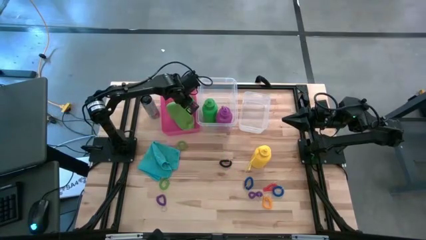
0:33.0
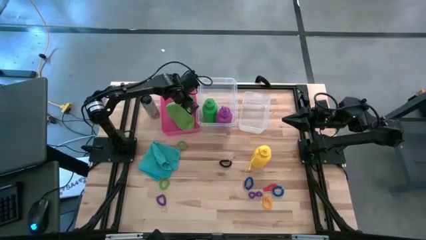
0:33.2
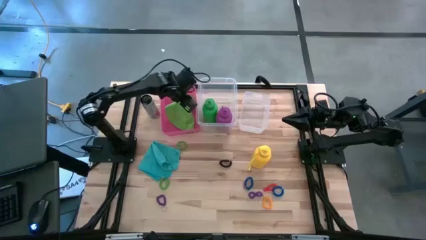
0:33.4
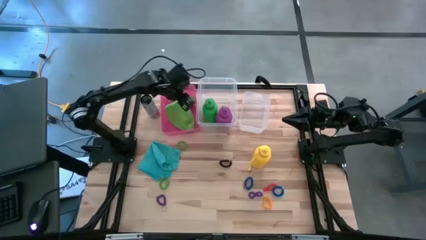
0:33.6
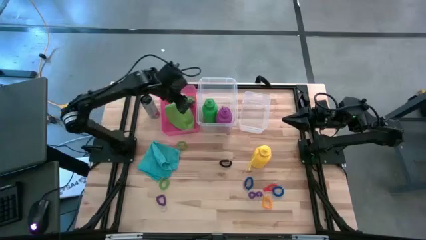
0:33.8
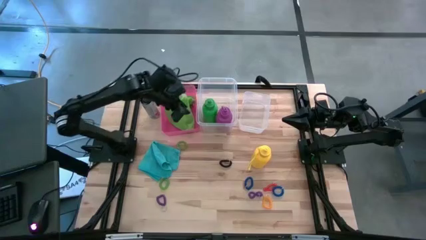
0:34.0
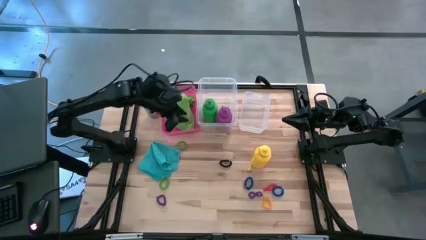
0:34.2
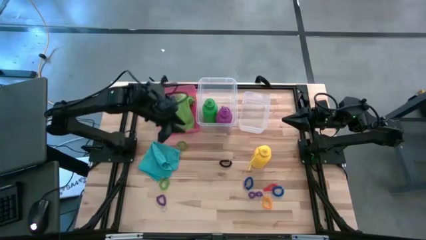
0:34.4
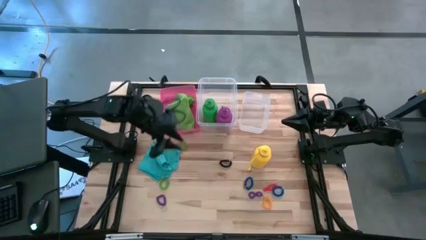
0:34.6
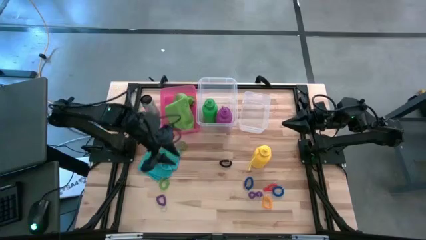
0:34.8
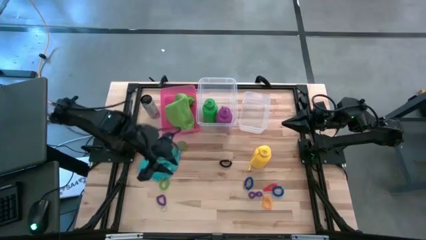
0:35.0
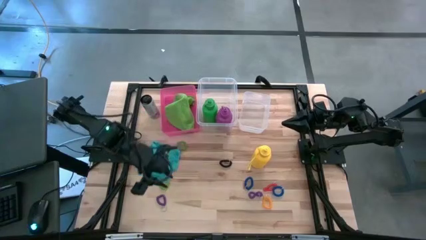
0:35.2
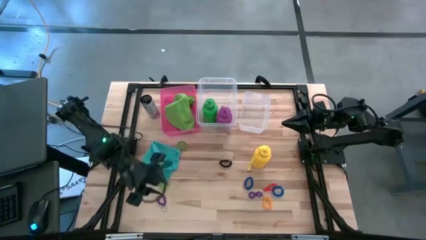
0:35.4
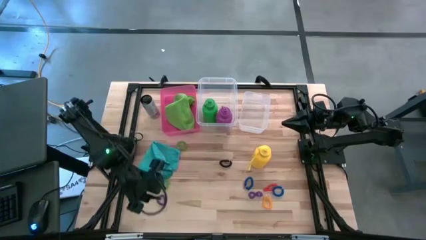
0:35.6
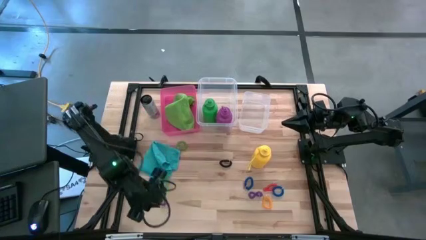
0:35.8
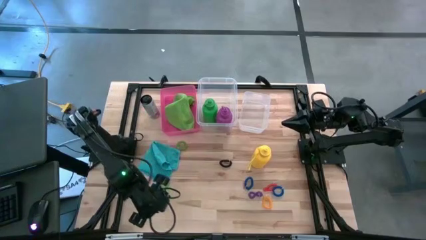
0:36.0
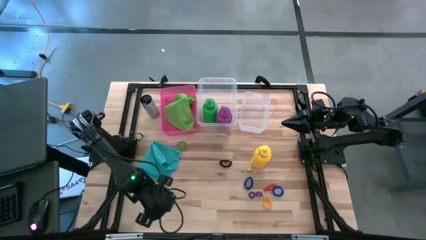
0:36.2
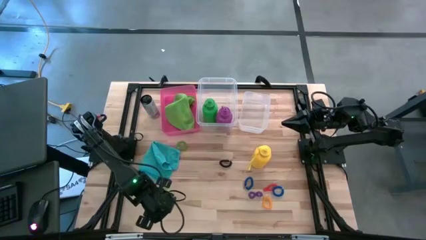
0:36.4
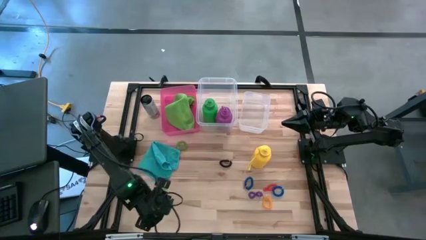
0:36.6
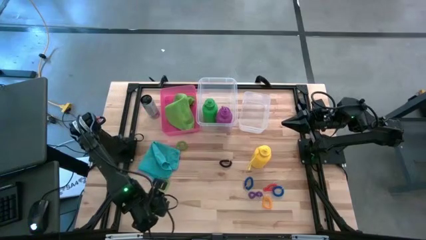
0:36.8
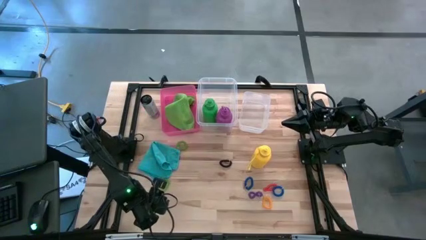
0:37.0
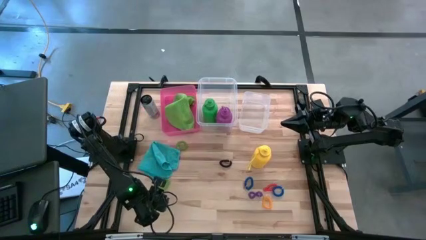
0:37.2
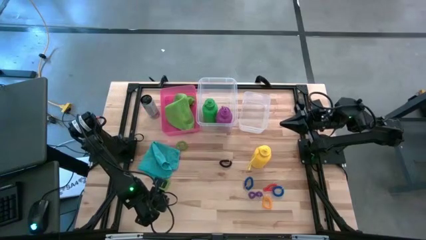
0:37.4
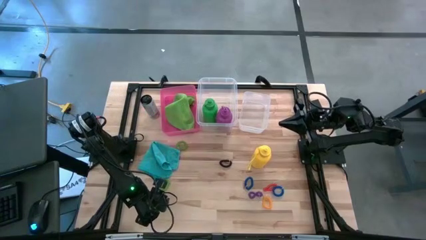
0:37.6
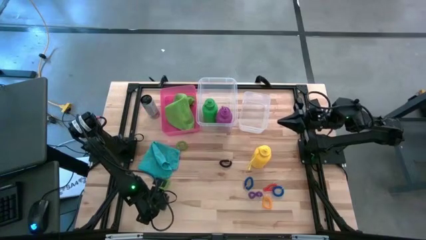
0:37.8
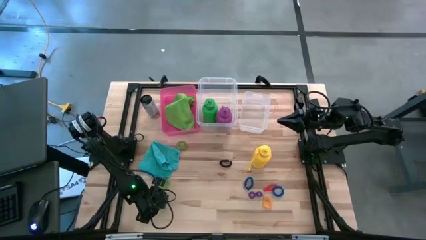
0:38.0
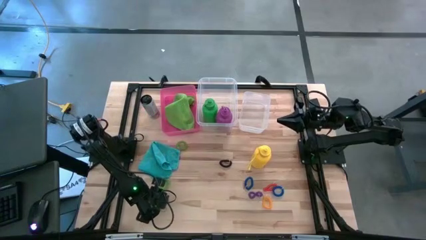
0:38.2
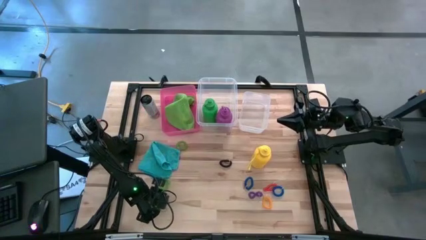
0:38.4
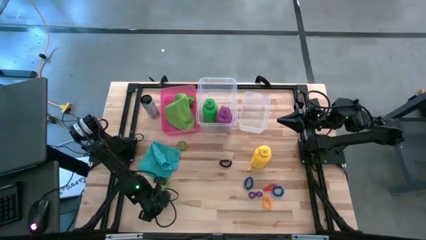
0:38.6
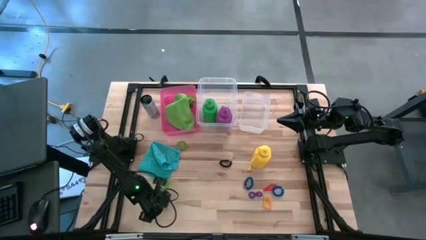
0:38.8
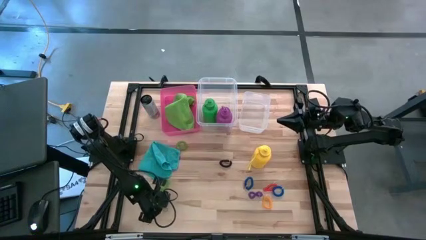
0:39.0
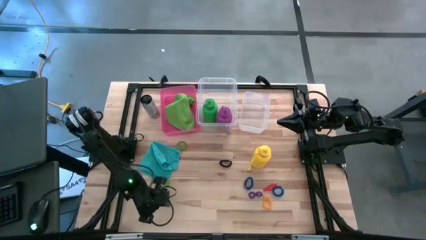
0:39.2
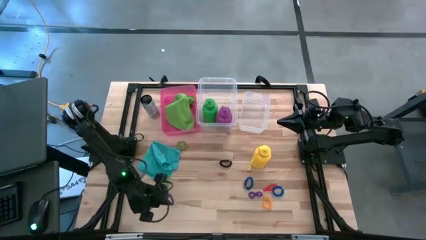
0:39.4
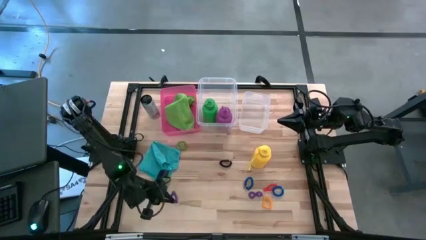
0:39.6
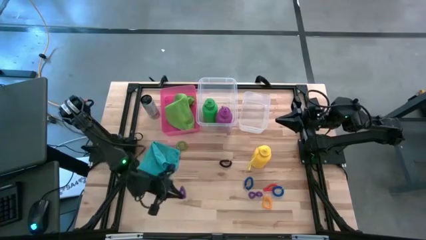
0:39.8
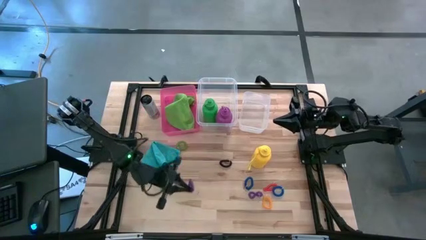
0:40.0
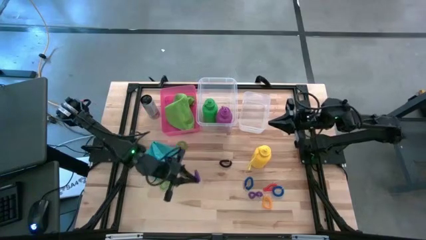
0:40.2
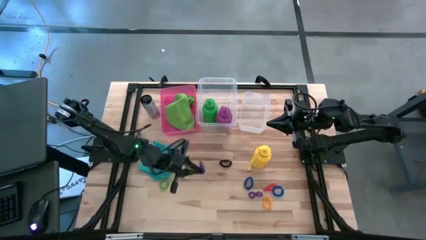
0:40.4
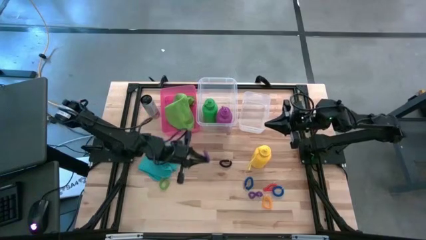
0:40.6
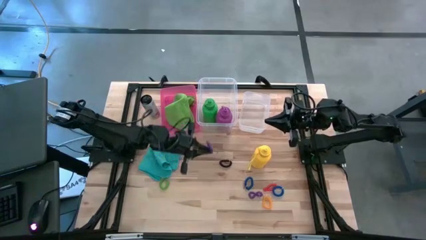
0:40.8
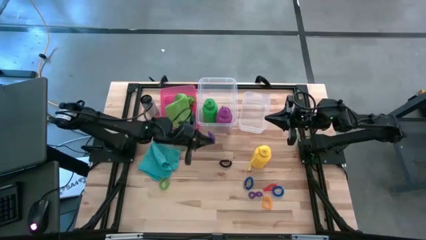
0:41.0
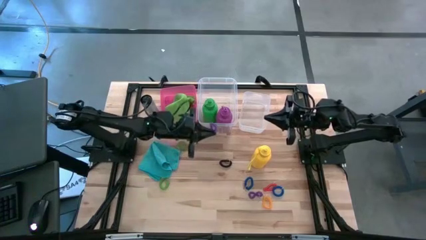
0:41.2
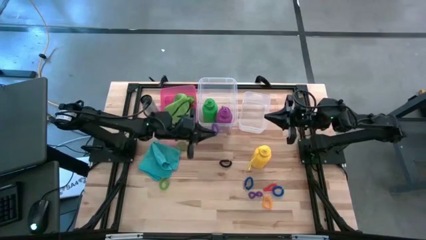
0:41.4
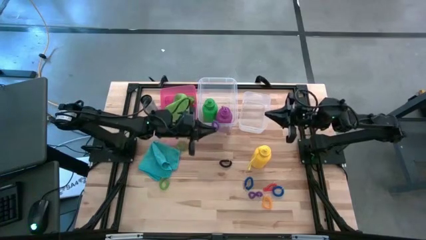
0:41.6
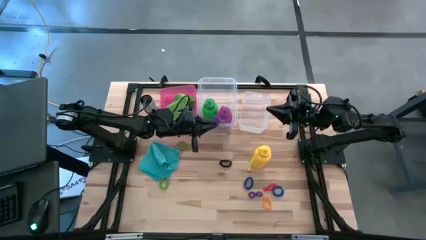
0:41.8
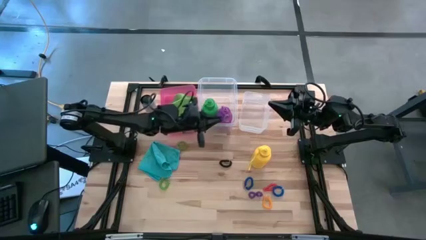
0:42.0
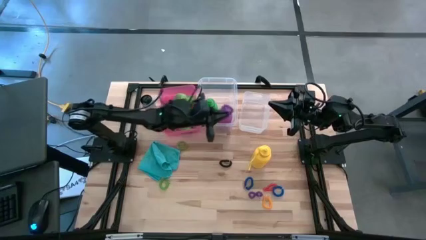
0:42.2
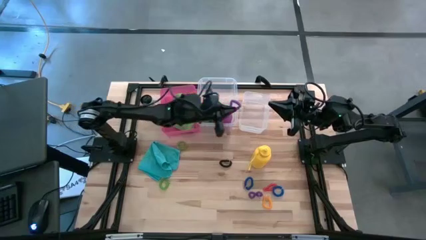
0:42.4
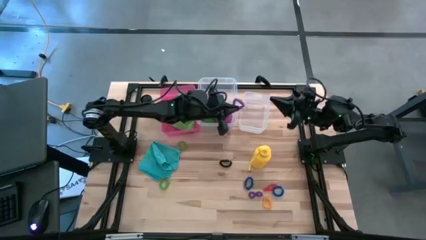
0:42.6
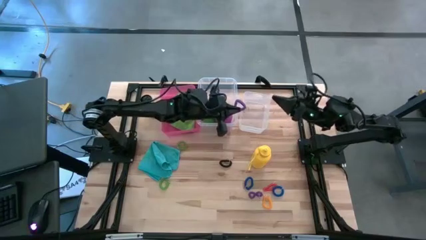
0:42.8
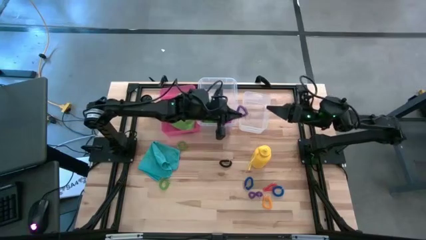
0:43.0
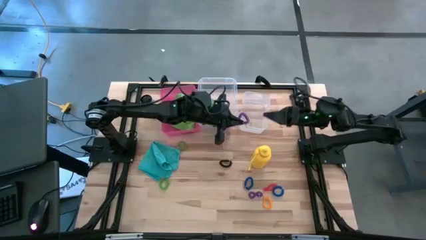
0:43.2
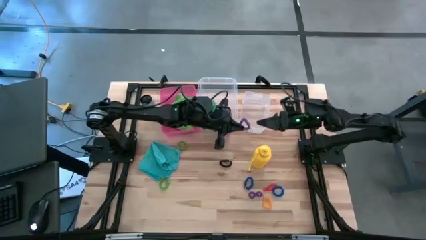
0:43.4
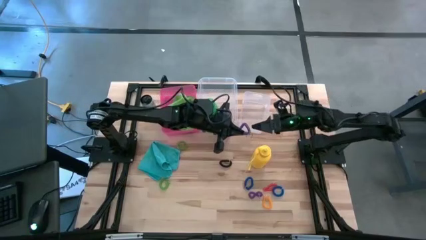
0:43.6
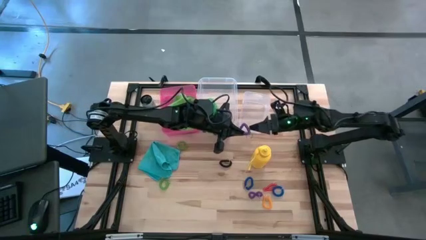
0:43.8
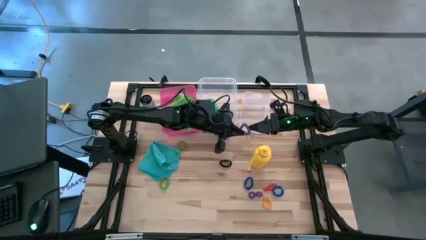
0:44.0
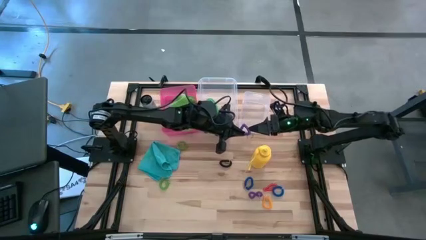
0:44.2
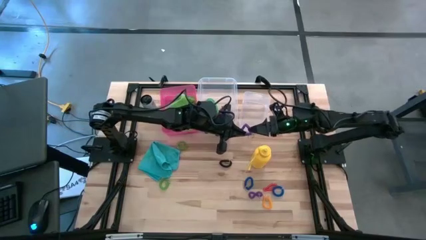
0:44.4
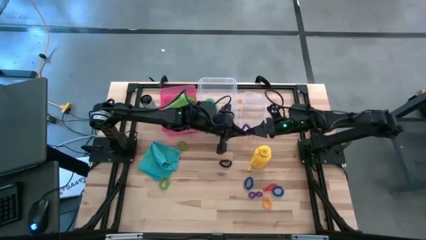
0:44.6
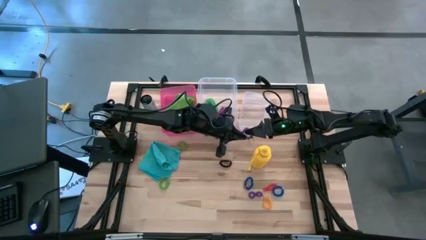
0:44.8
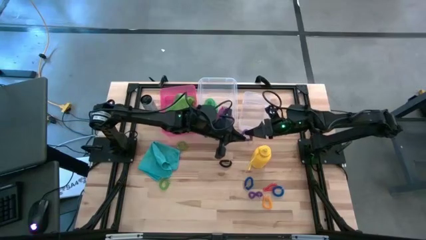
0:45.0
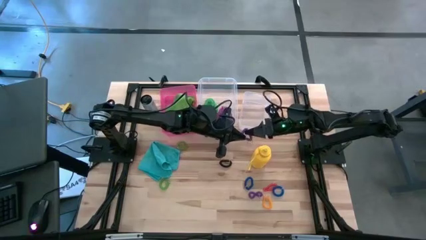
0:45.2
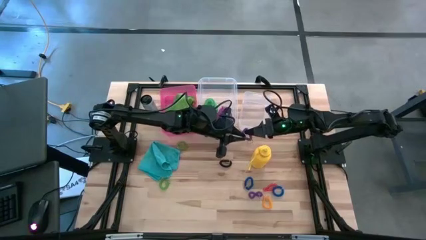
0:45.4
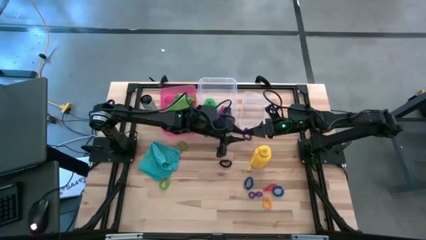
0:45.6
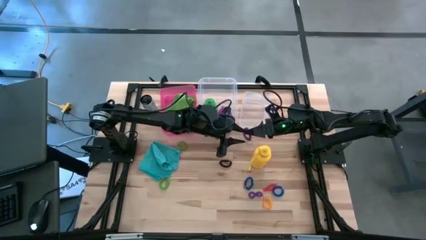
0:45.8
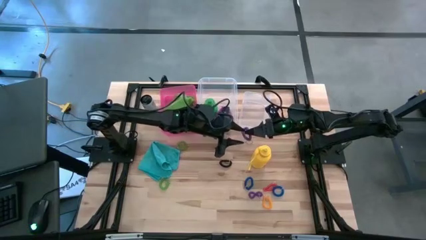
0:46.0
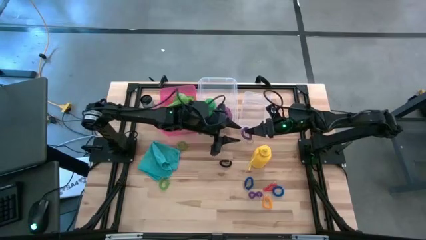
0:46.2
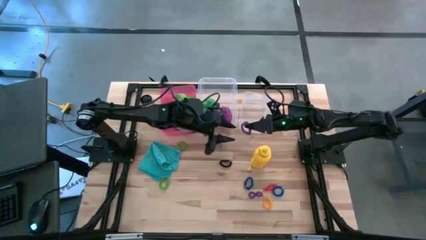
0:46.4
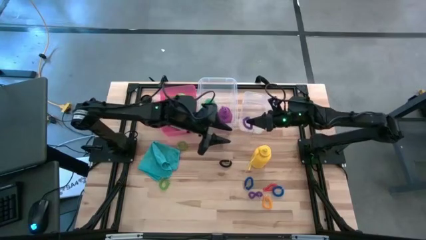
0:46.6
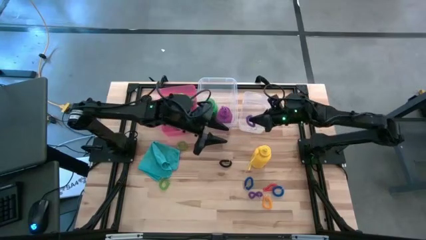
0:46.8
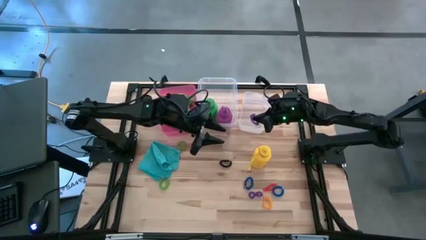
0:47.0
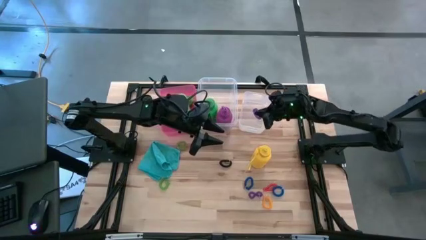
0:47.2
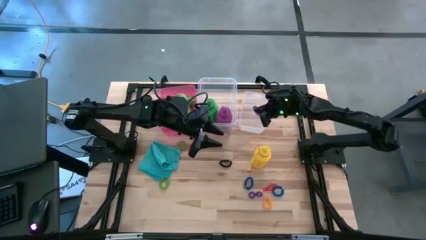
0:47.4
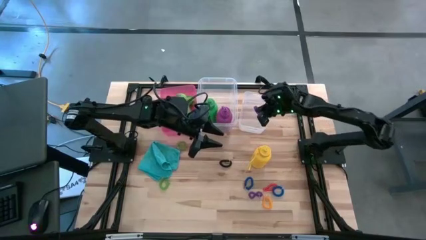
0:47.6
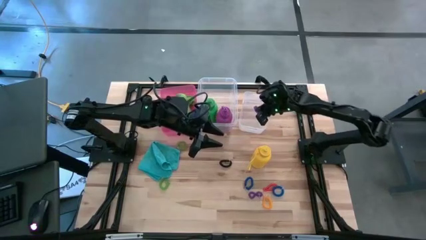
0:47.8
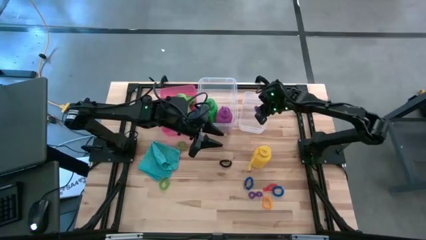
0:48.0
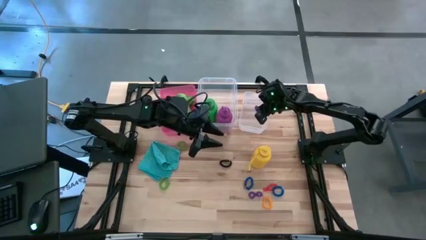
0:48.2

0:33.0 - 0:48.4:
Task: Pick & Place Sports Items
Put the left purple spring keychain into the right transparent bin
